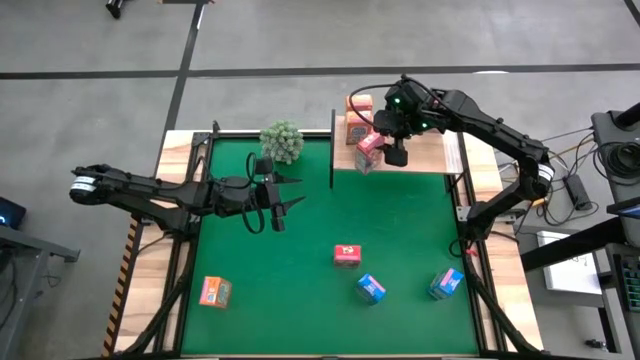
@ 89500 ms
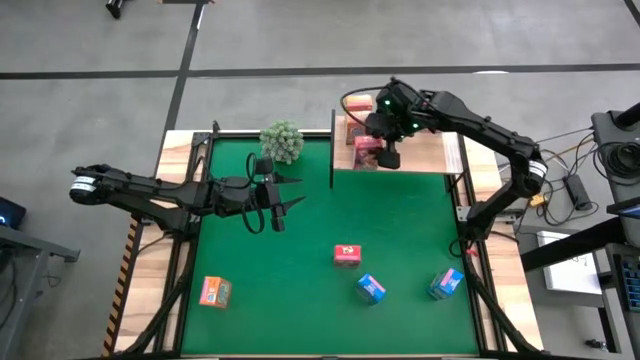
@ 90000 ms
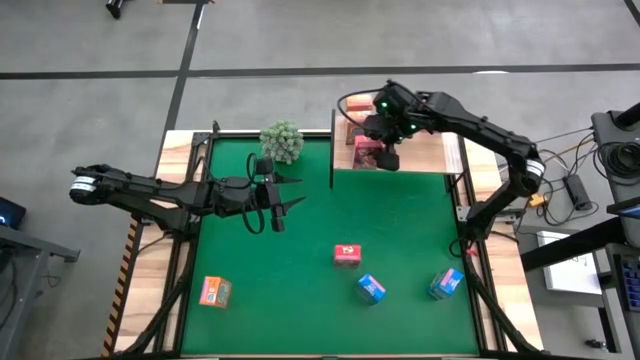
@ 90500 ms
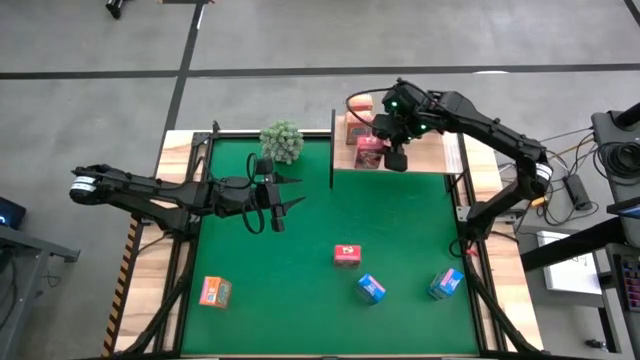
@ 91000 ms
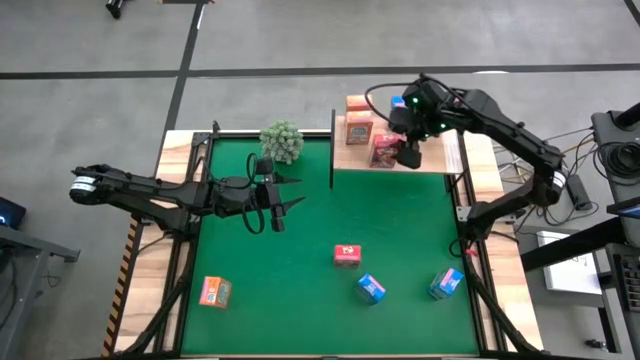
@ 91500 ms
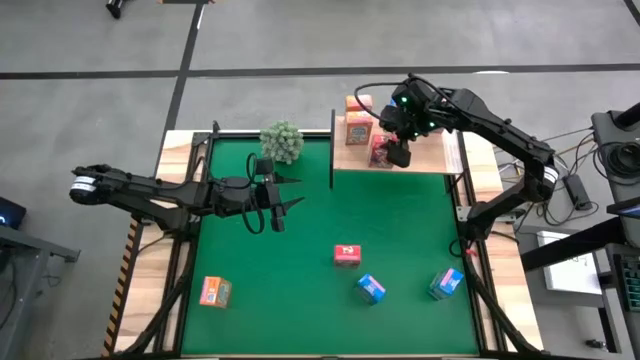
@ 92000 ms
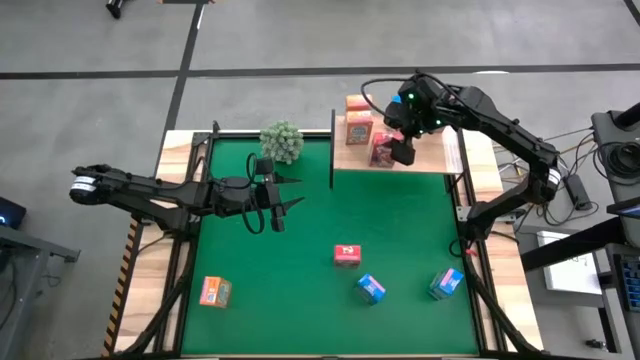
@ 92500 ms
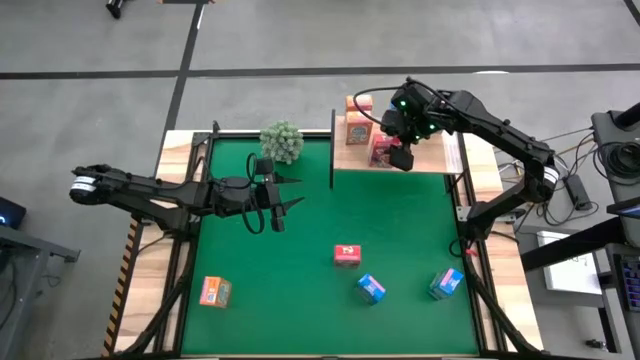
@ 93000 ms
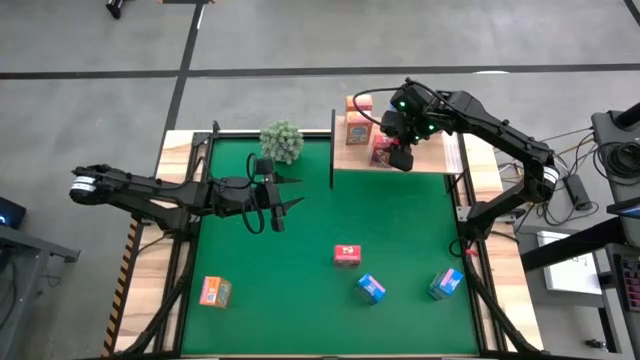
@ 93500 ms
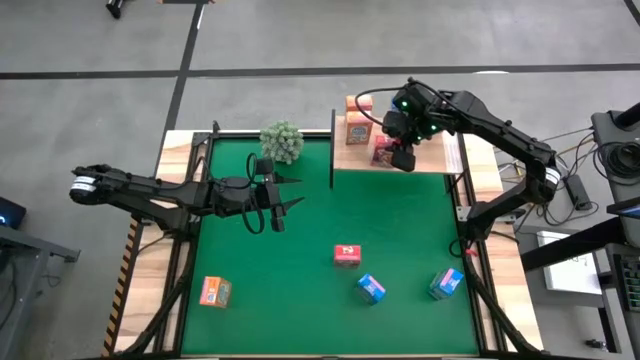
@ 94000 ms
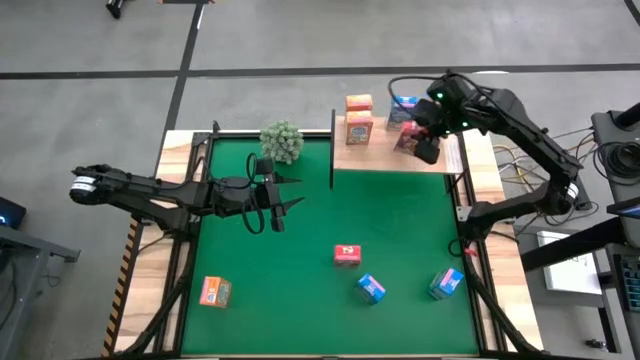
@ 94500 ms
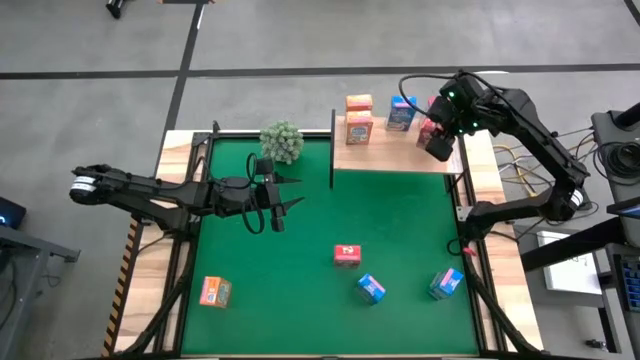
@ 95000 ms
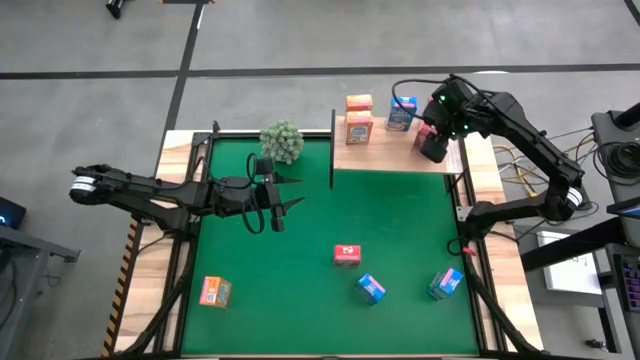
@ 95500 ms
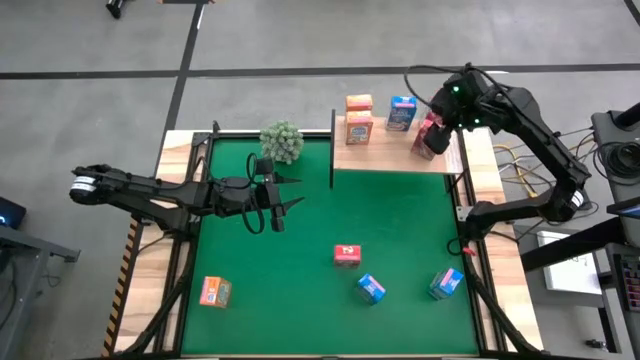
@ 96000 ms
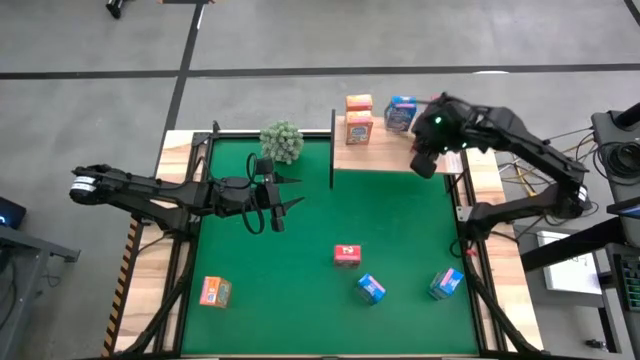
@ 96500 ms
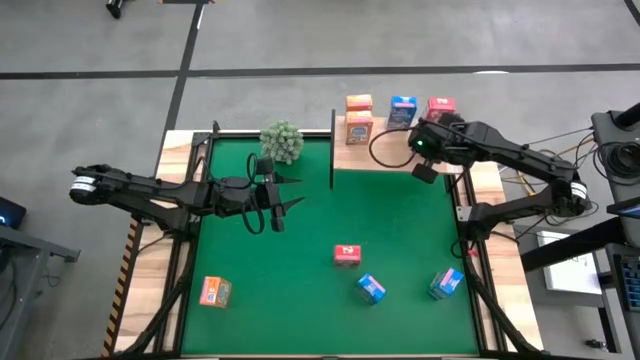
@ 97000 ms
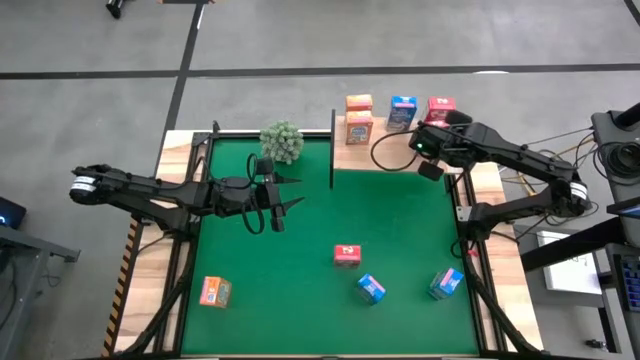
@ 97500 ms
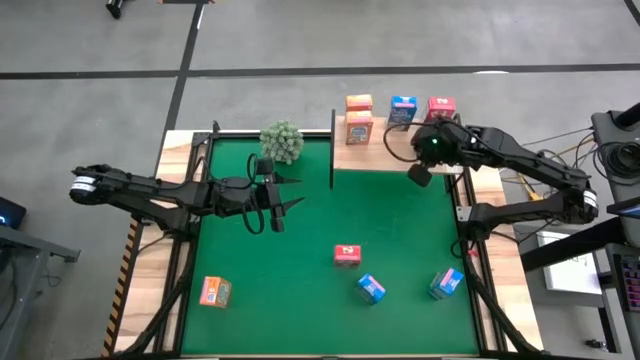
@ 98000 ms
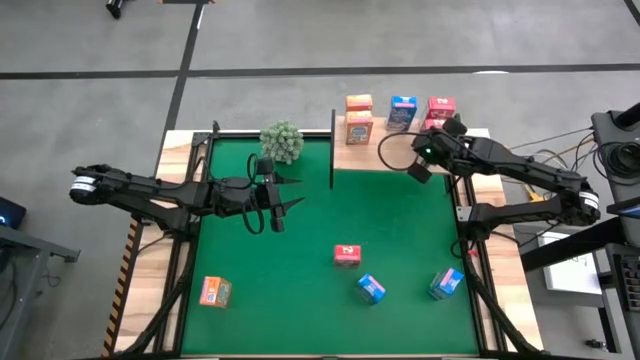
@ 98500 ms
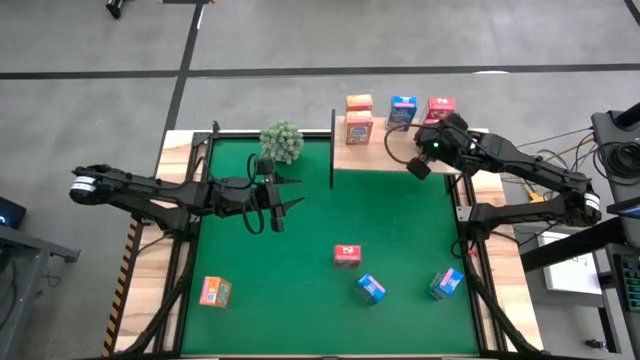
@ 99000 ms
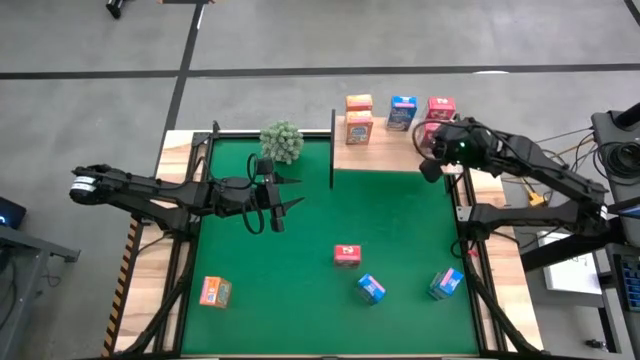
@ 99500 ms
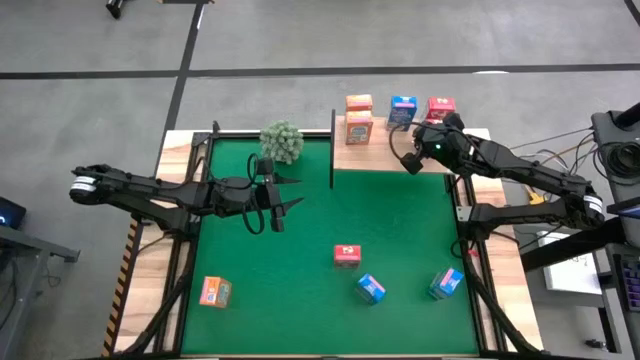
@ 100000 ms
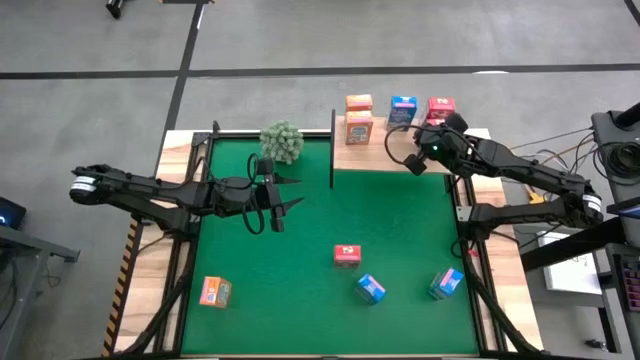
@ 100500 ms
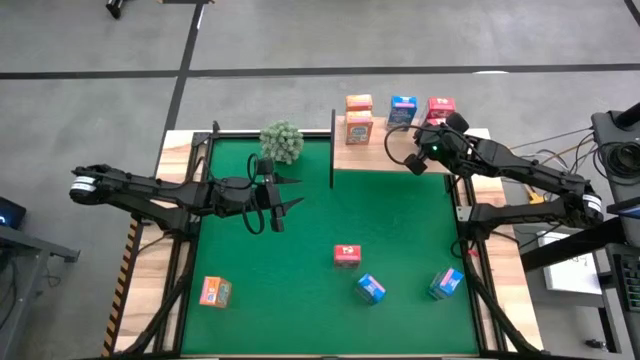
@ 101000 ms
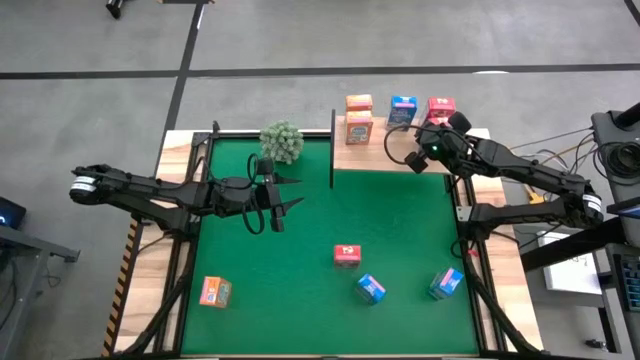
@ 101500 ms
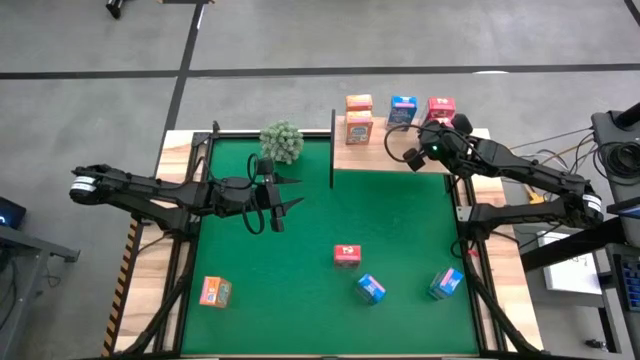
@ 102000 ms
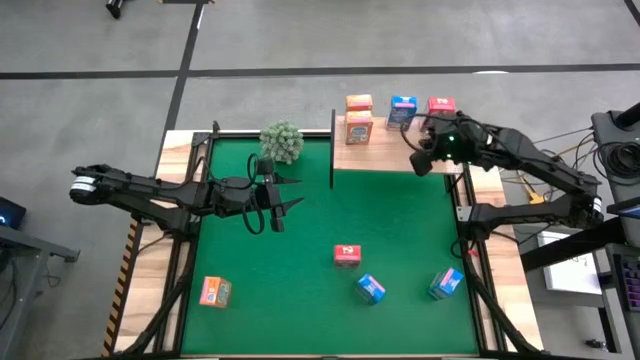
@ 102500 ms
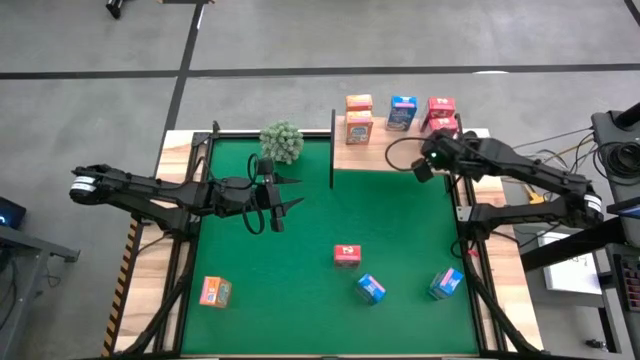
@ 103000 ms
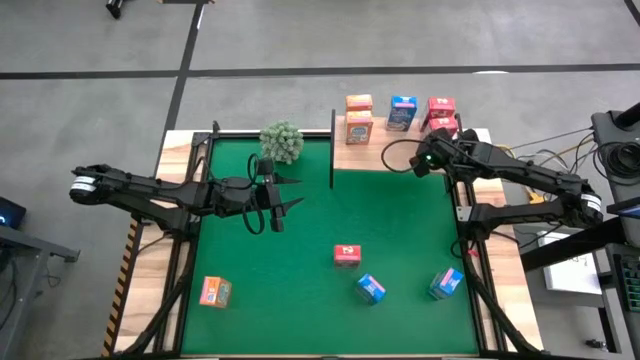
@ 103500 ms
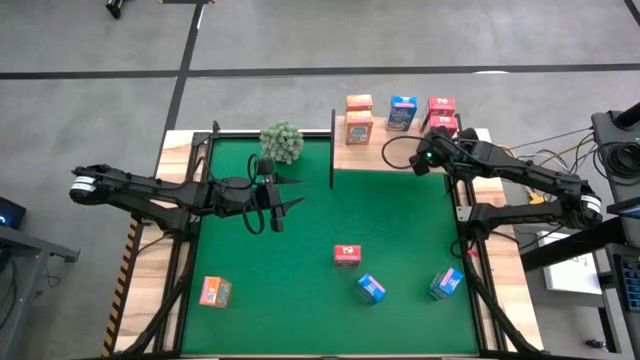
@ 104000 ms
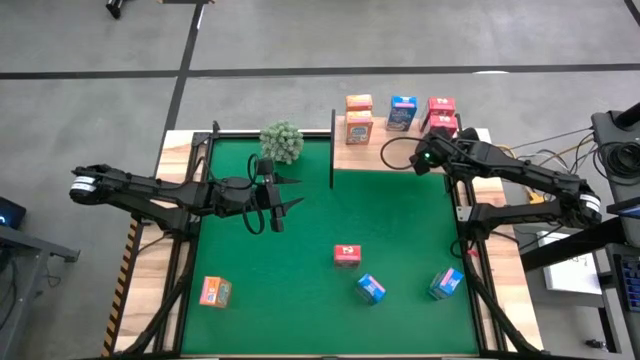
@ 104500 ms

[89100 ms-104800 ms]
Task: Stack cereal on shelf
Put the left red cereal box on the shelf

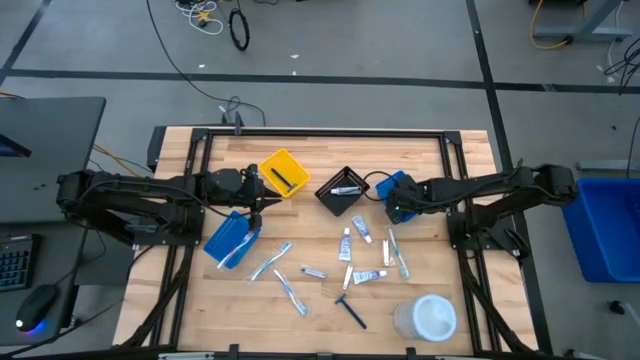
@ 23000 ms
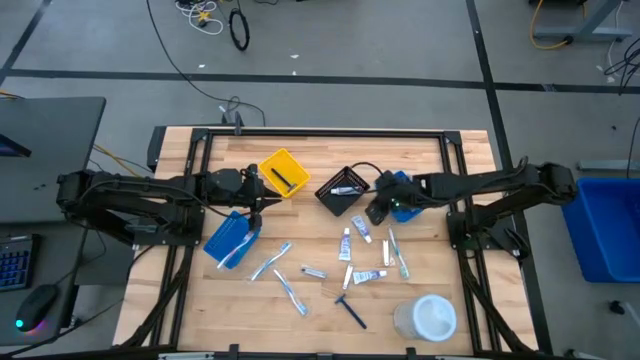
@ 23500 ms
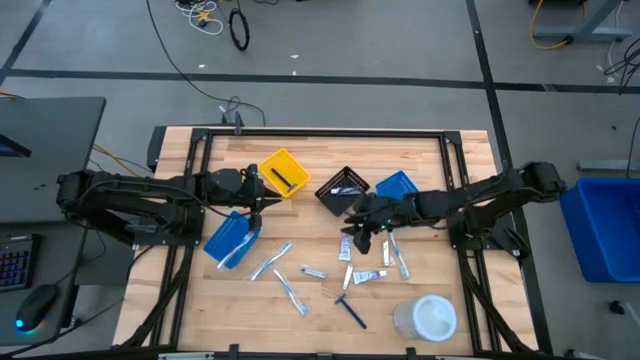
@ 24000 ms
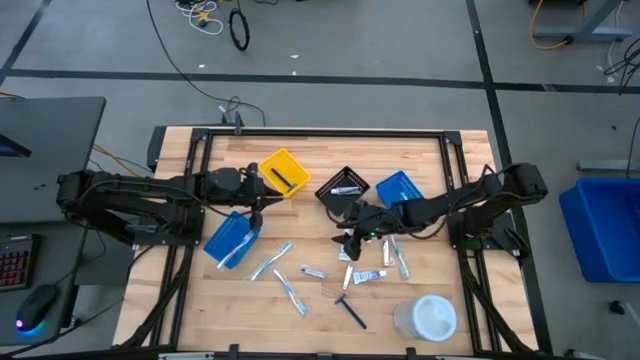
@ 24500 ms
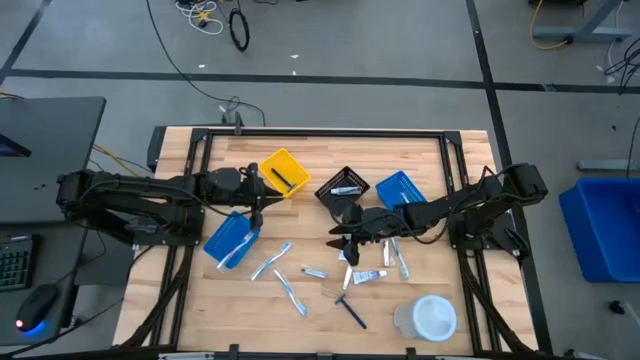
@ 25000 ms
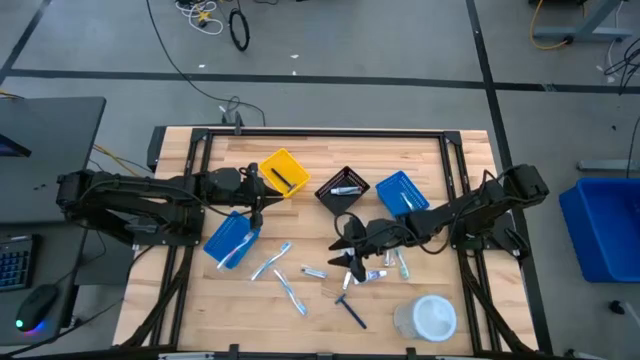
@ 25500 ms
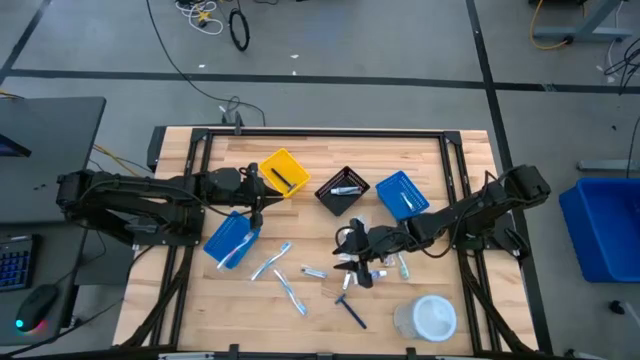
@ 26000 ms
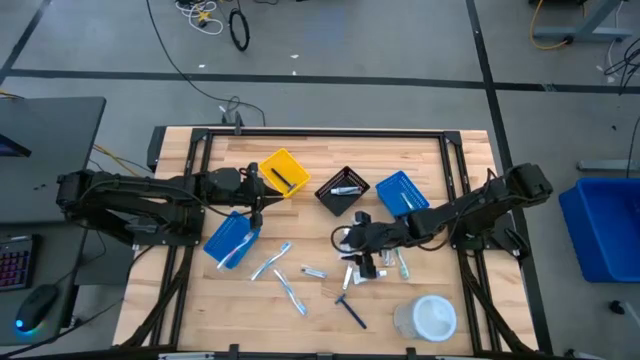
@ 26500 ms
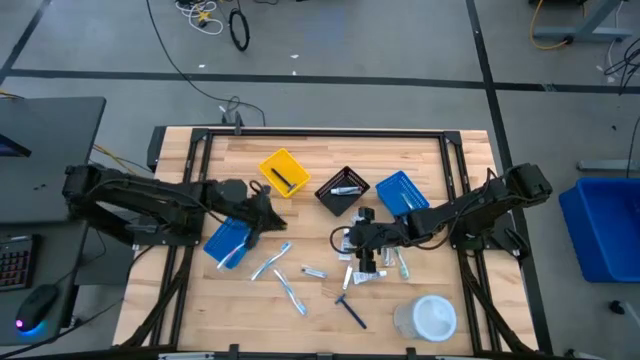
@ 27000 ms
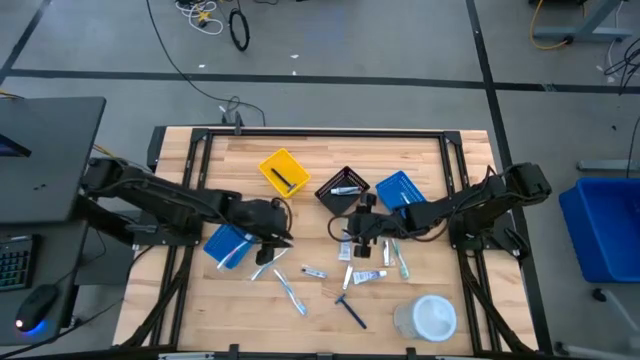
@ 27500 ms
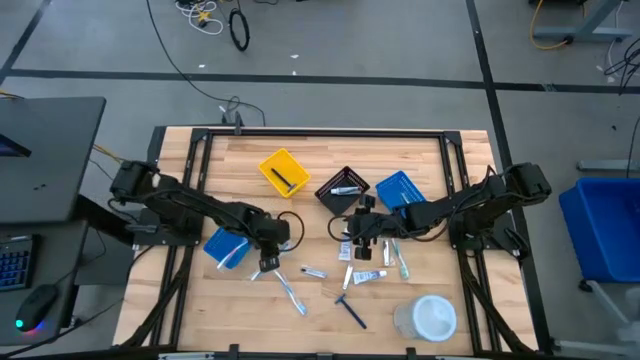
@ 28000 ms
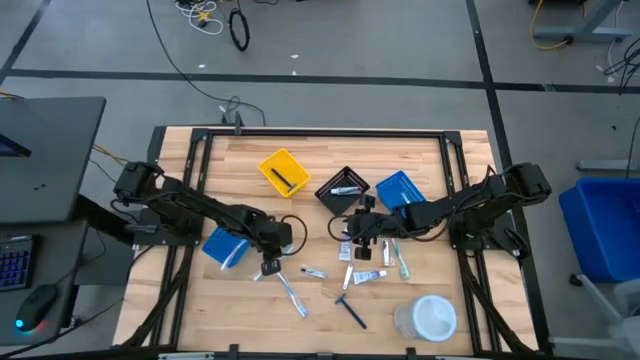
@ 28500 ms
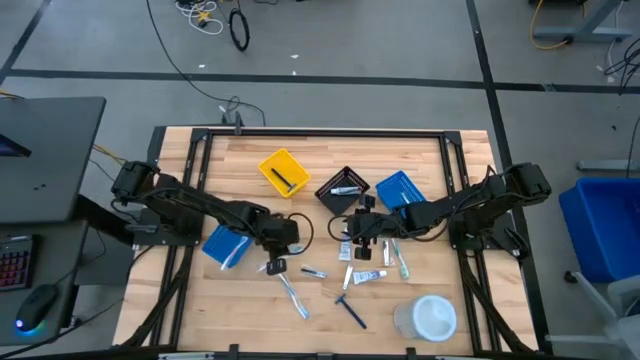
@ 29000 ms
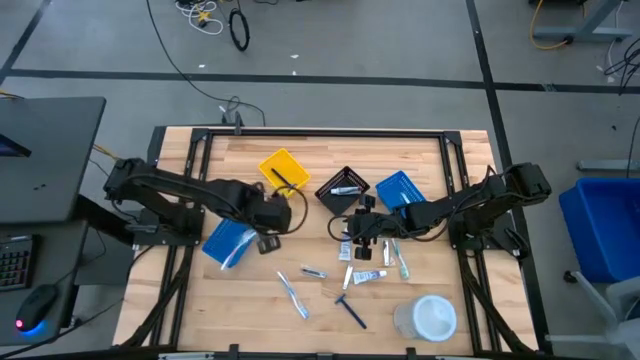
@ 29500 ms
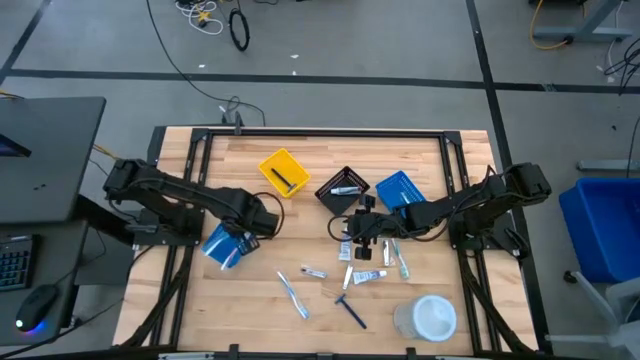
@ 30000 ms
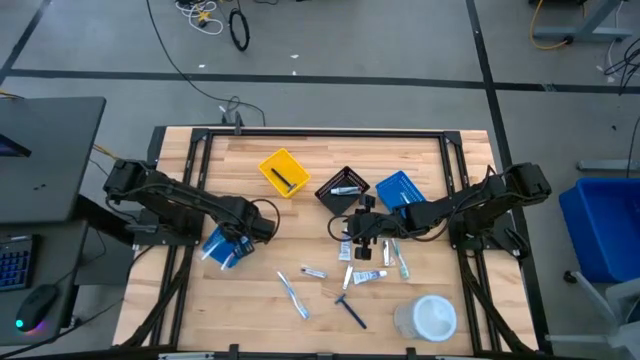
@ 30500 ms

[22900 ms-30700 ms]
Task: Pick & Place Travel size toiletries
Put the blue toothbrush into the left blue bin
